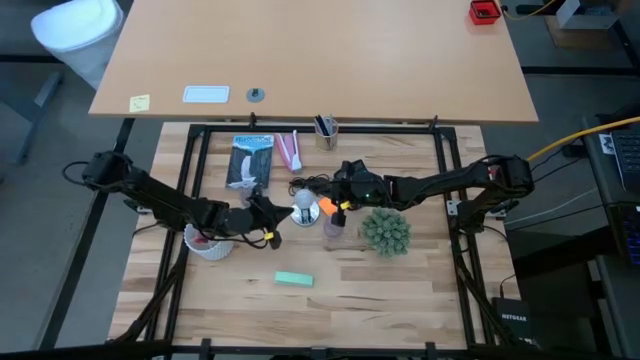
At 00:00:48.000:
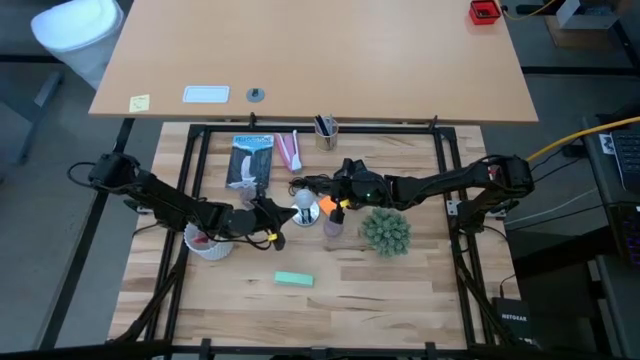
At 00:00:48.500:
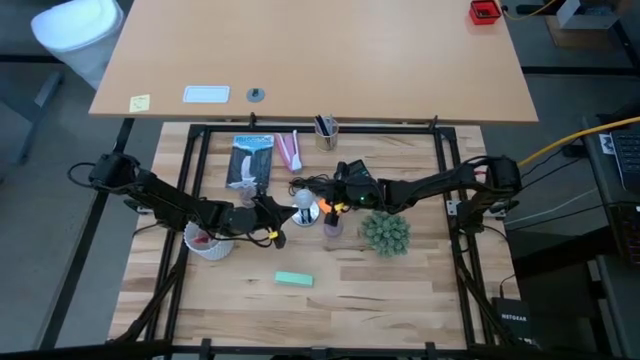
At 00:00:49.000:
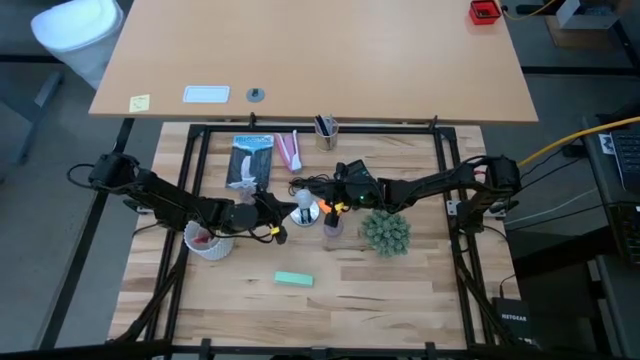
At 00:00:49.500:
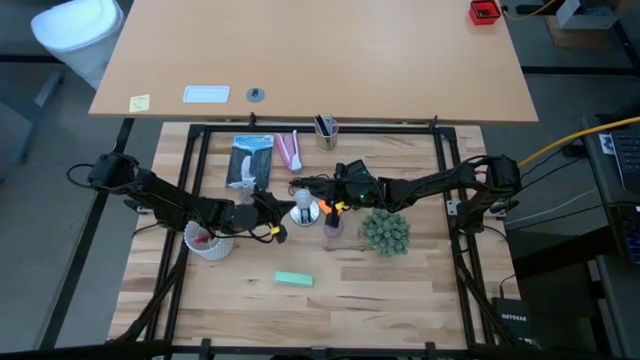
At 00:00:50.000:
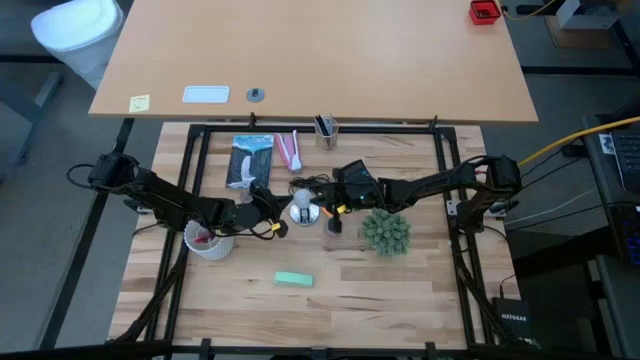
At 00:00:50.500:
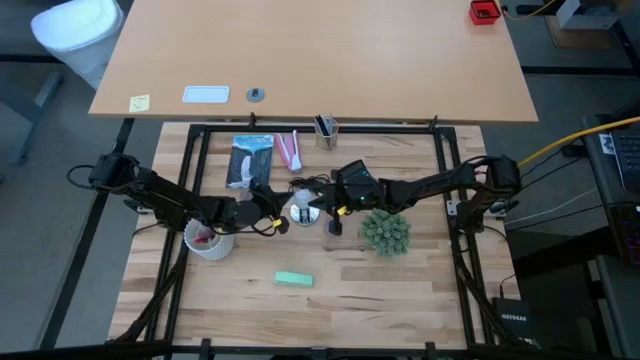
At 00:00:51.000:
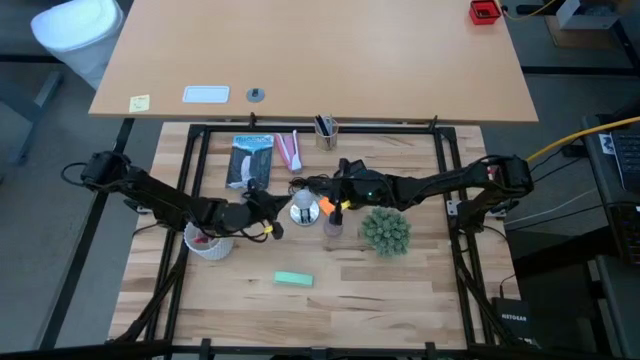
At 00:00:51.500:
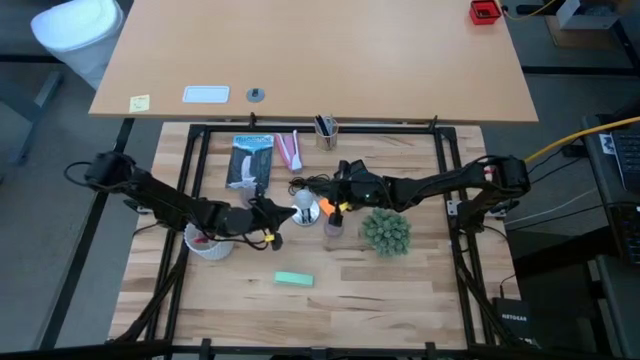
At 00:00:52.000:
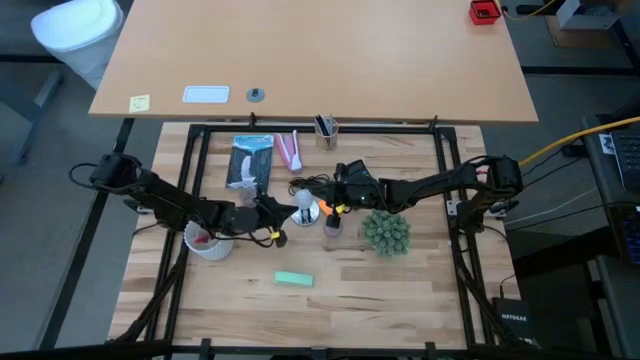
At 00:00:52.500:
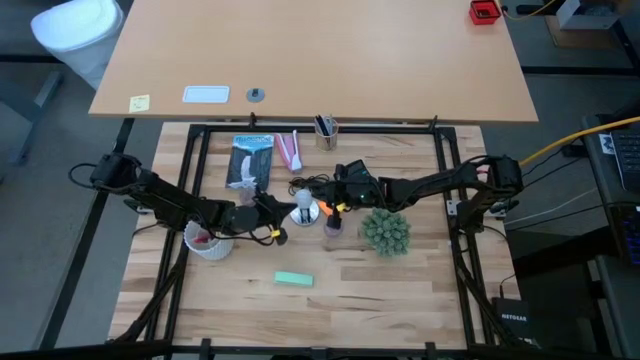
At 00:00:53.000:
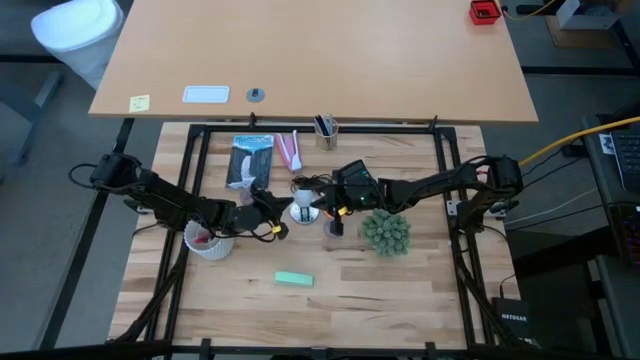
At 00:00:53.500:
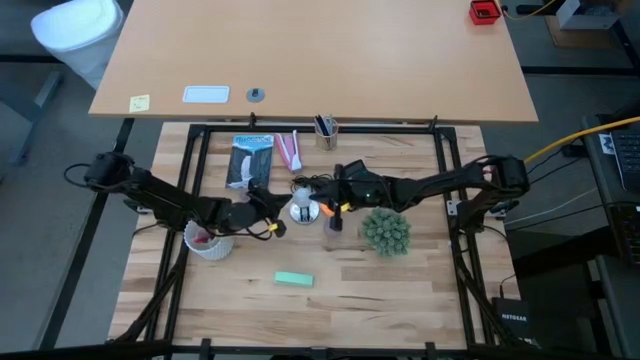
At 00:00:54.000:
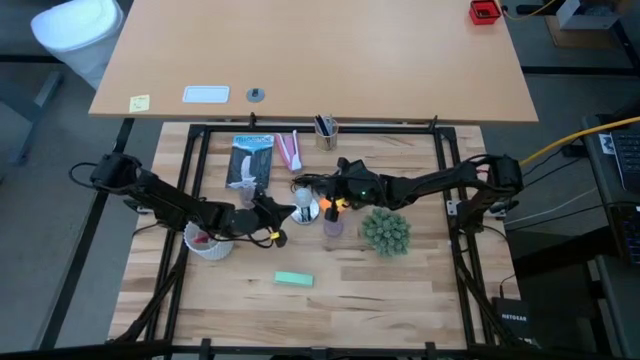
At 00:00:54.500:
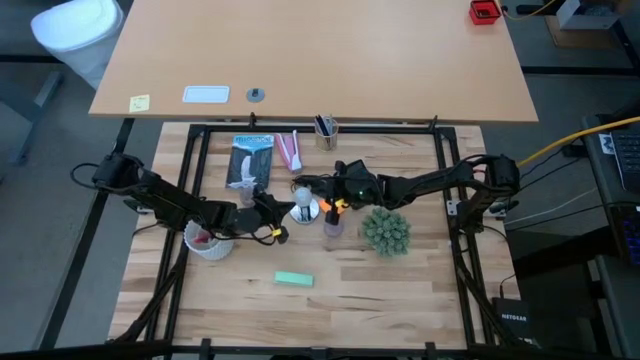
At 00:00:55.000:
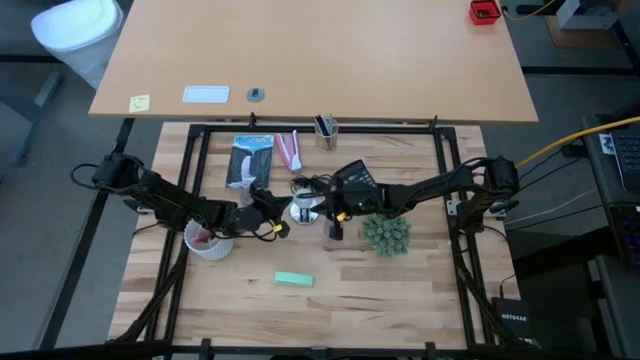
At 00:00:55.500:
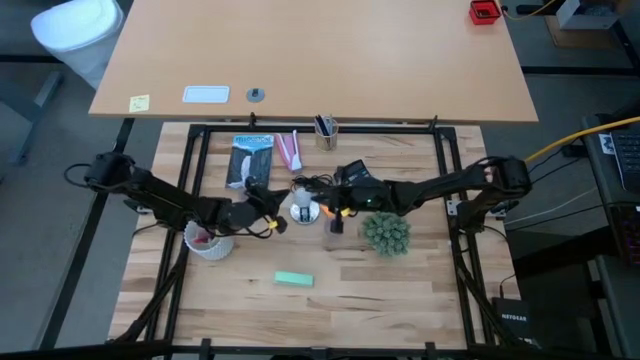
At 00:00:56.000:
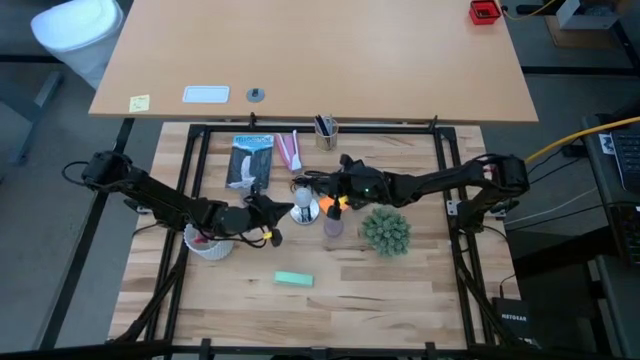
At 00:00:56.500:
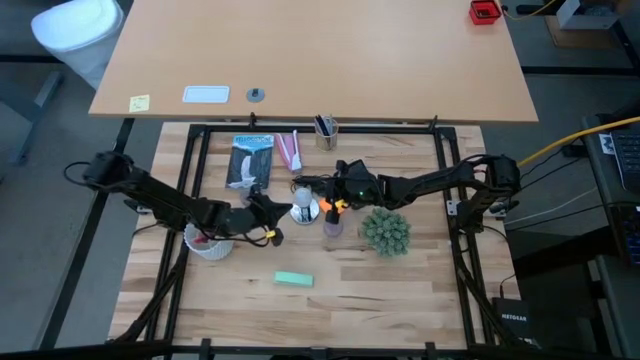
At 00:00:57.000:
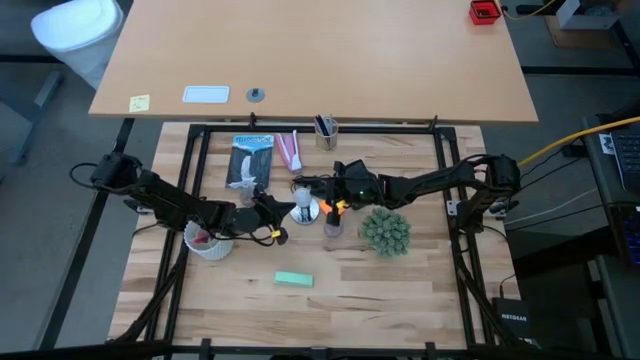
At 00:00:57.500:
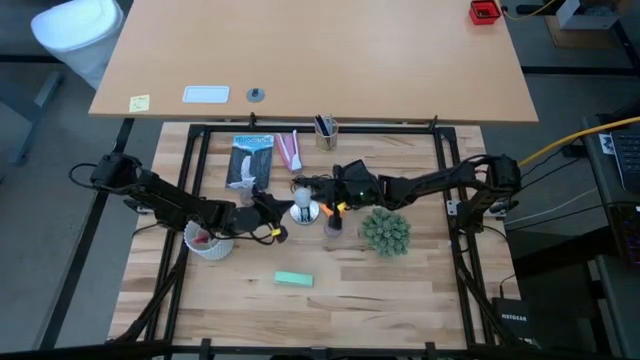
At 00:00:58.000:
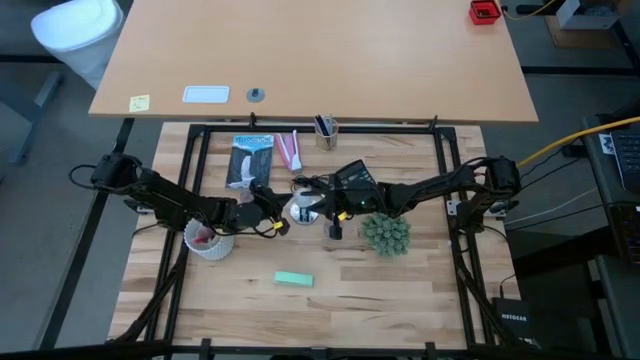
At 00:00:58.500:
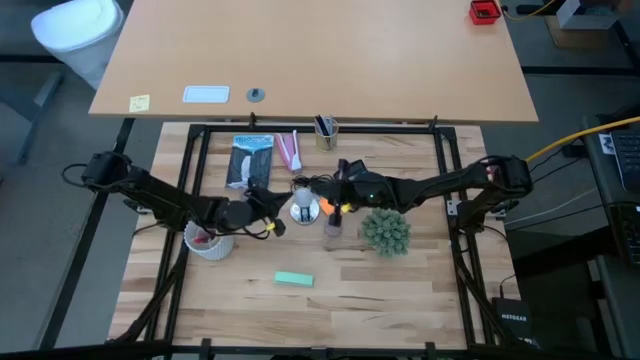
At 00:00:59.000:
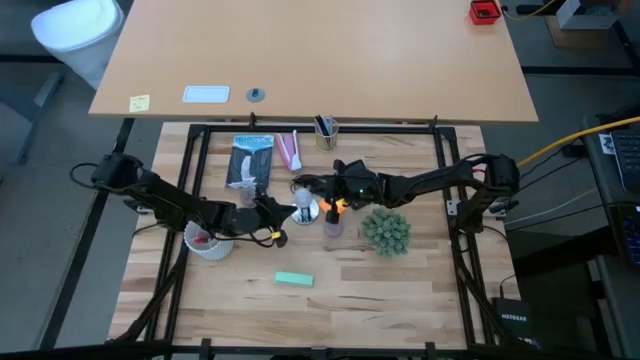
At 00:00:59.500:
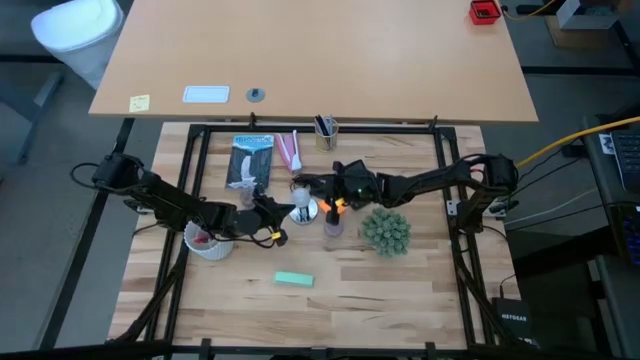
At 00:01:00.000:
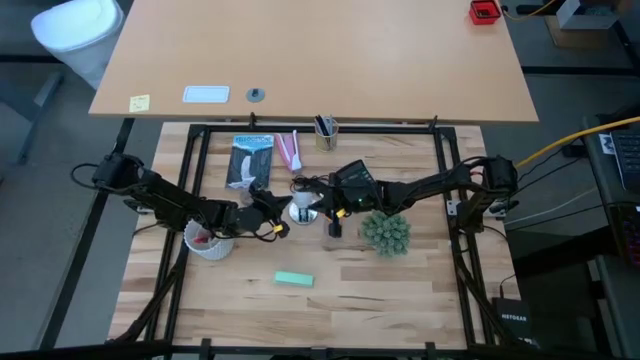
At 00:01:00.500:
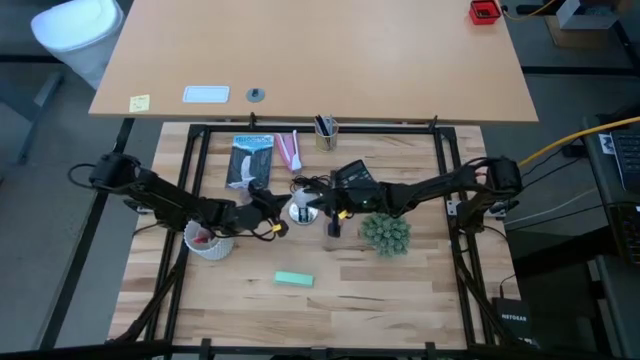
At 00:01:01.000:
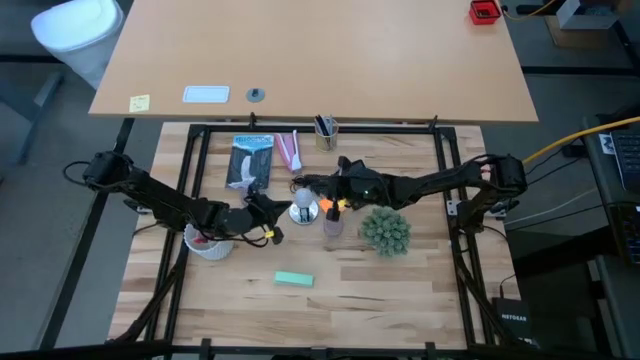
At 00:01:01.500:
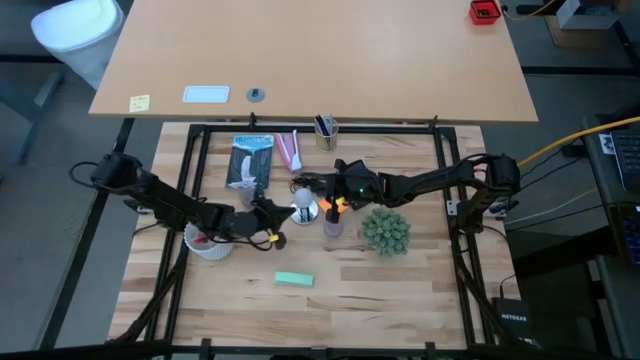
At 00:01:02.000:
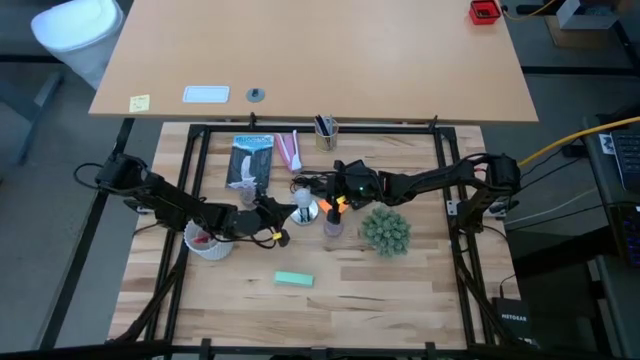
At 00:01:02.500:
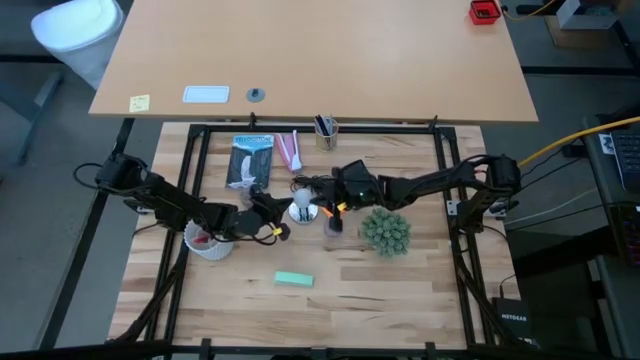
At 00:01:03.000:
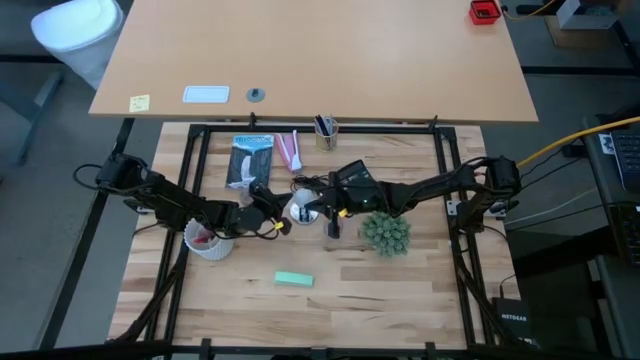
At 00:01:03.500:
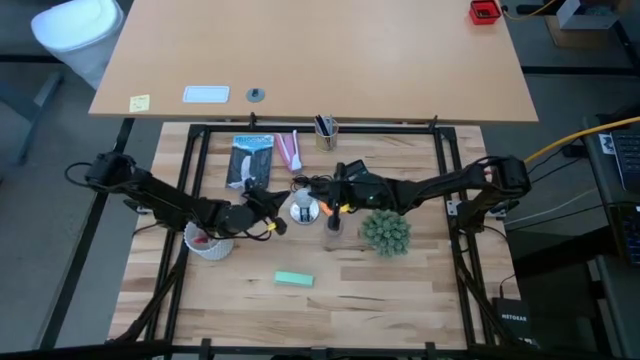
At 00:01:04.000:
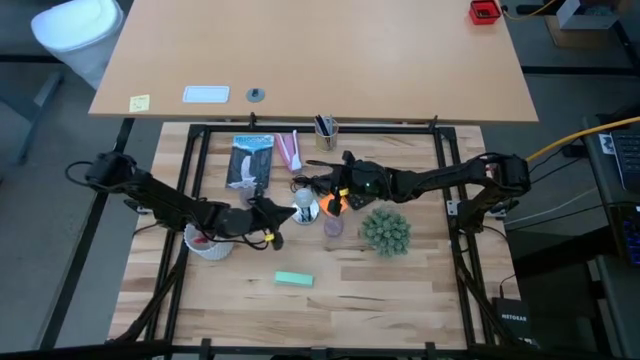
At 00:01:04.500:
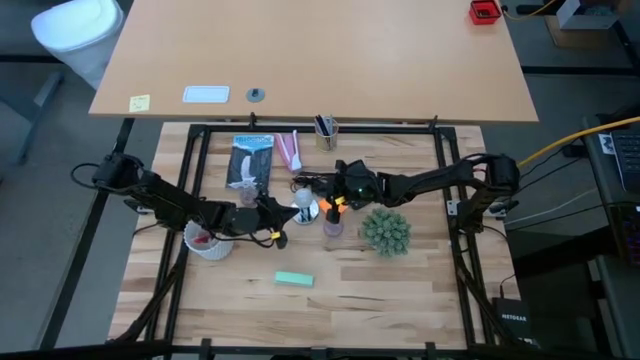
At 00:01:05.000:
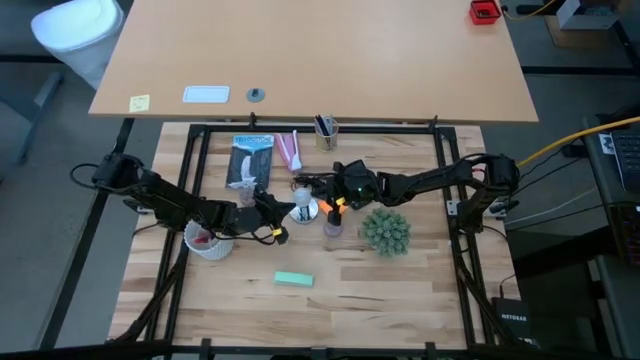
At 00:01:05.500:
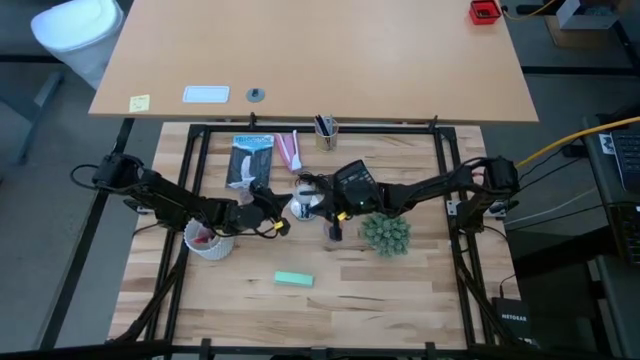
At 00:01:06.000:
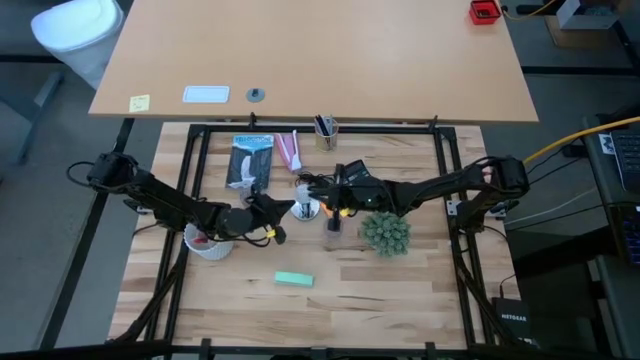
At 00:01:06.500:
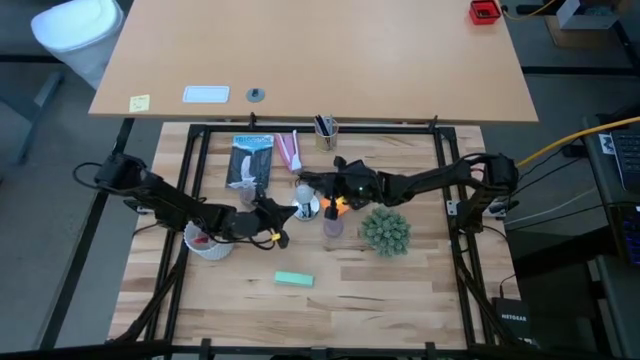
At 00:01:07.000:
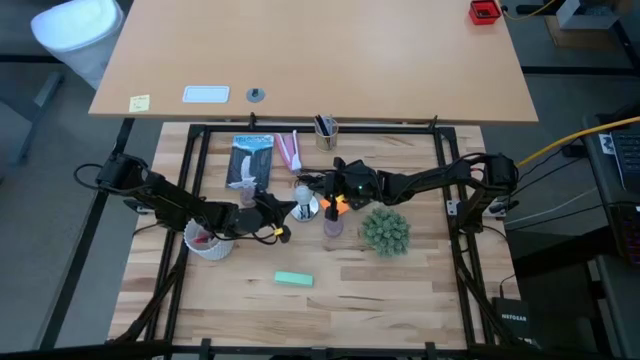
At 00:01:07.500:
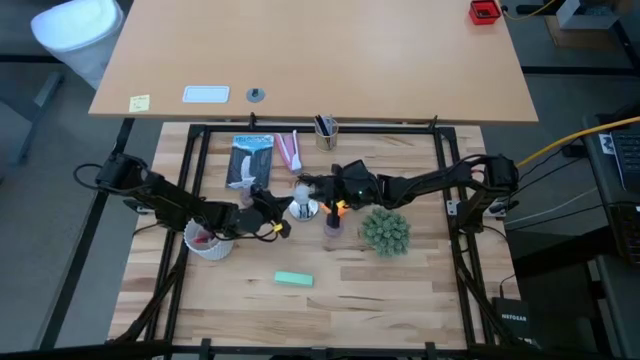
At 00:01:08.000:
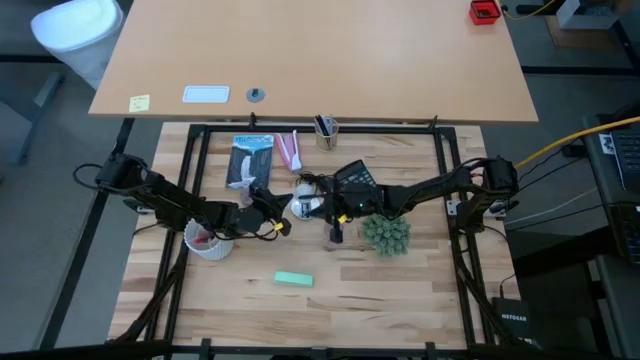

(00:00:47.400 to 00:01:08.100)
Task: Screw lightbulb
Insert the lightbulb on the lamp
